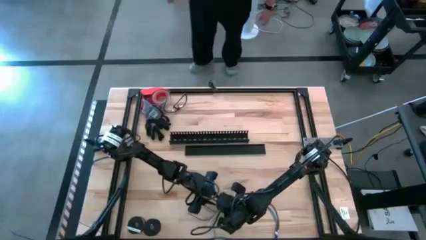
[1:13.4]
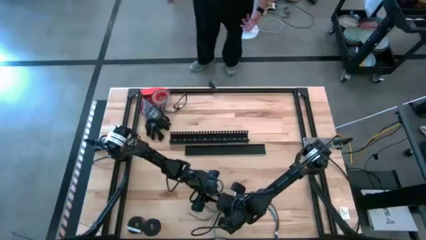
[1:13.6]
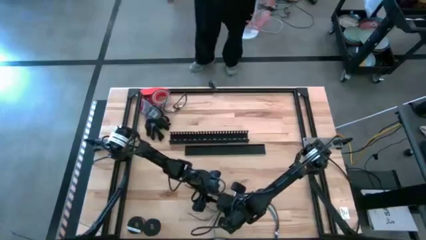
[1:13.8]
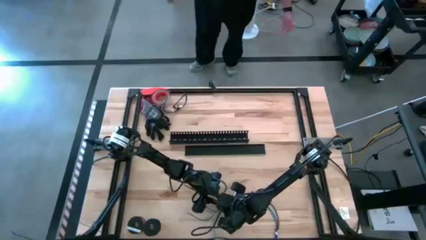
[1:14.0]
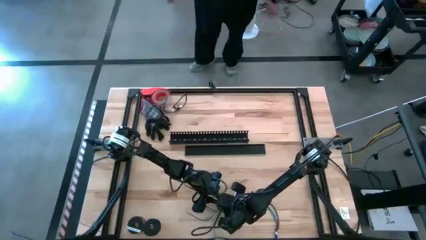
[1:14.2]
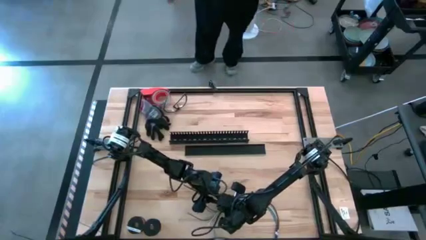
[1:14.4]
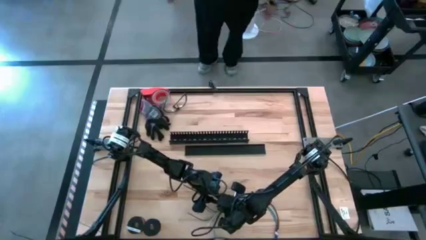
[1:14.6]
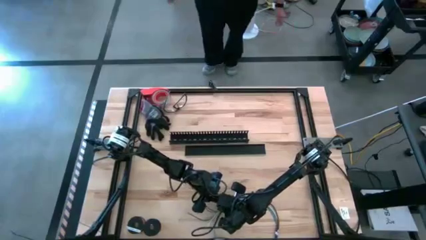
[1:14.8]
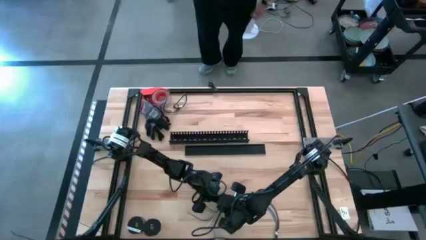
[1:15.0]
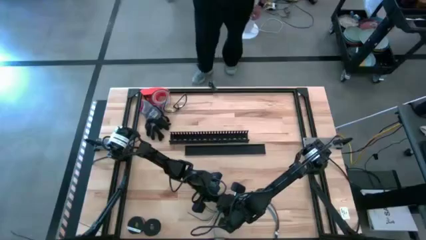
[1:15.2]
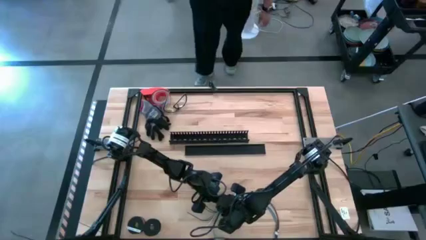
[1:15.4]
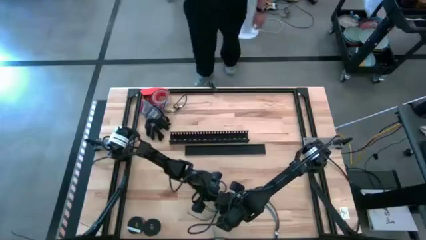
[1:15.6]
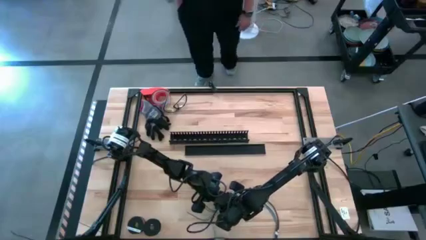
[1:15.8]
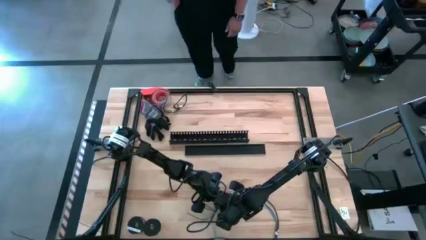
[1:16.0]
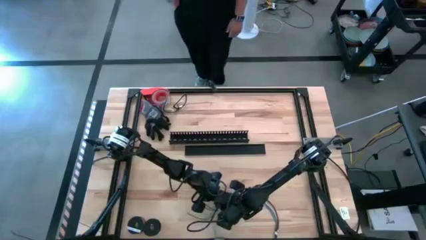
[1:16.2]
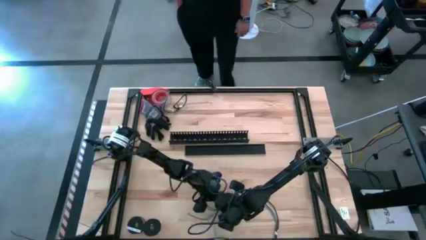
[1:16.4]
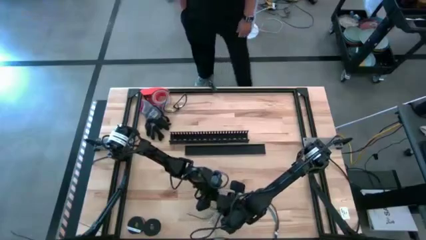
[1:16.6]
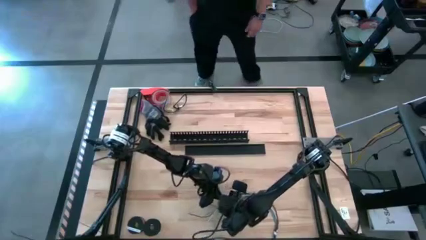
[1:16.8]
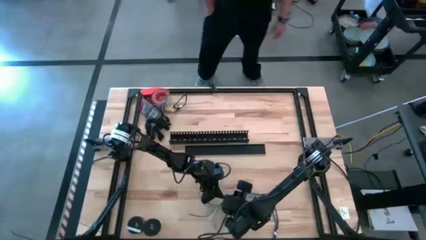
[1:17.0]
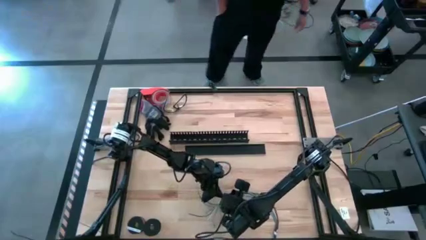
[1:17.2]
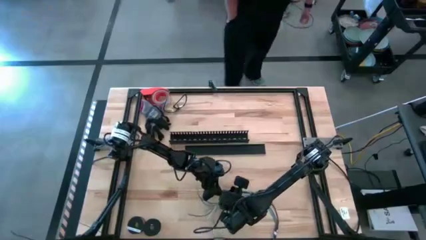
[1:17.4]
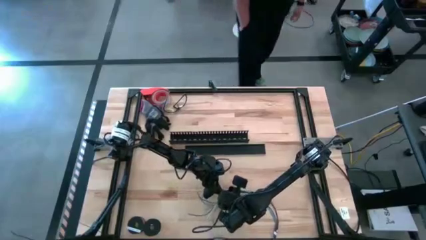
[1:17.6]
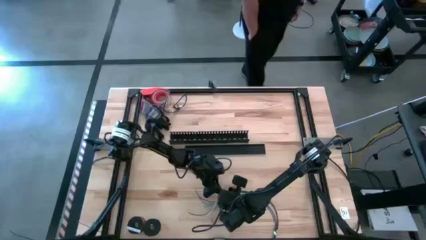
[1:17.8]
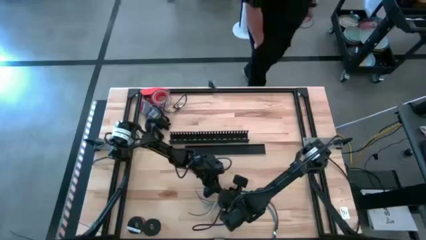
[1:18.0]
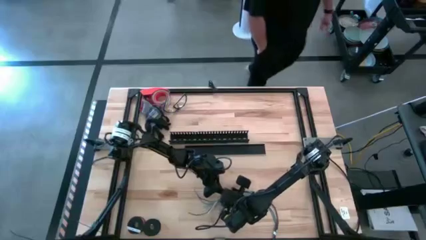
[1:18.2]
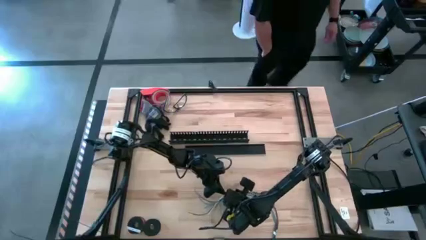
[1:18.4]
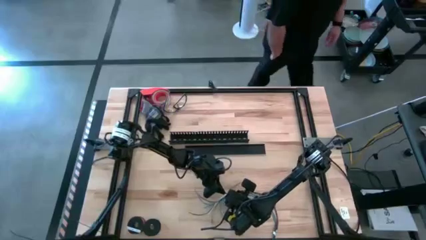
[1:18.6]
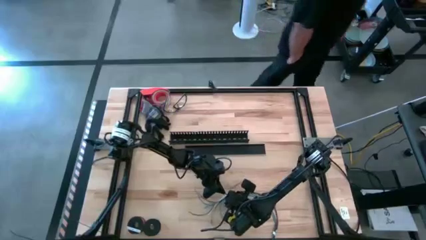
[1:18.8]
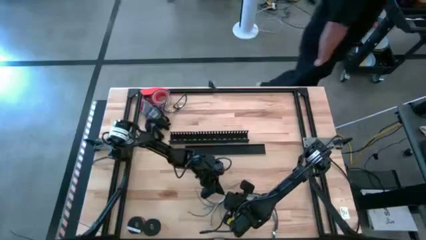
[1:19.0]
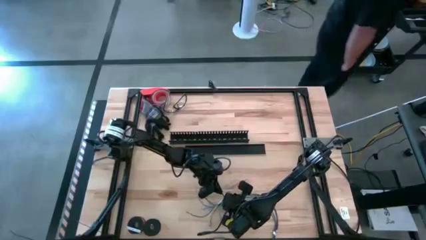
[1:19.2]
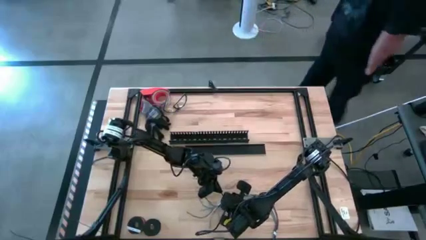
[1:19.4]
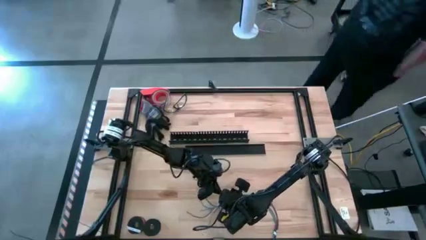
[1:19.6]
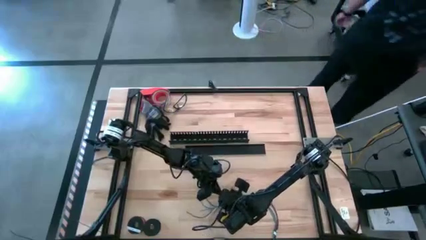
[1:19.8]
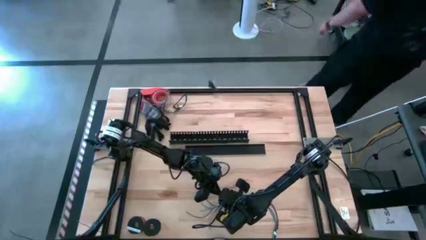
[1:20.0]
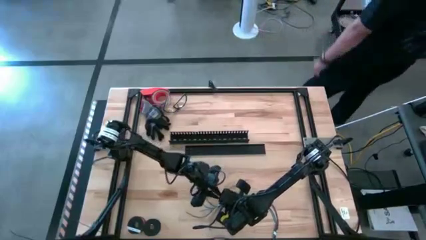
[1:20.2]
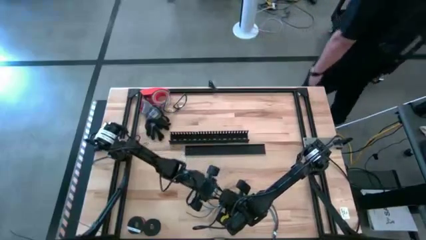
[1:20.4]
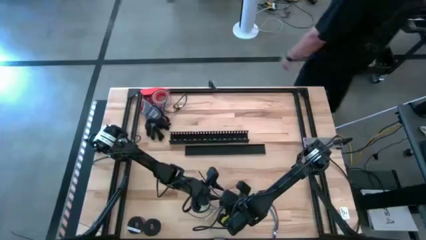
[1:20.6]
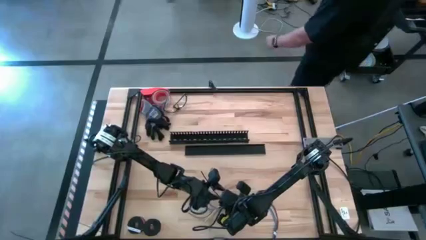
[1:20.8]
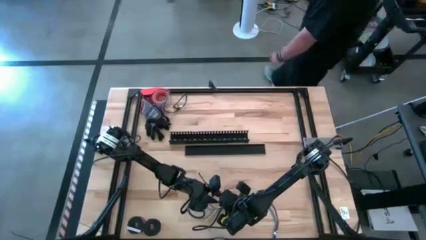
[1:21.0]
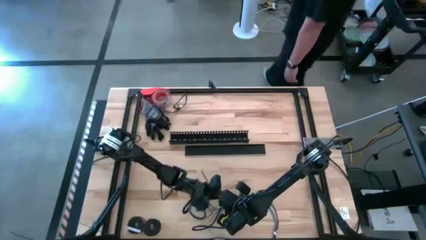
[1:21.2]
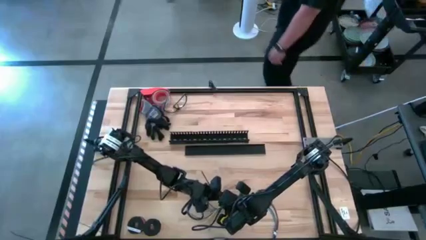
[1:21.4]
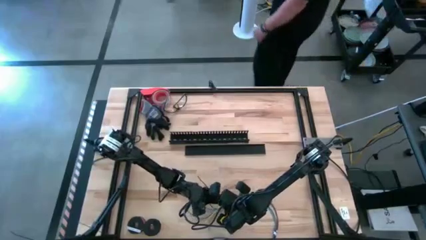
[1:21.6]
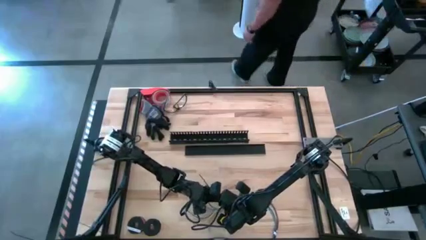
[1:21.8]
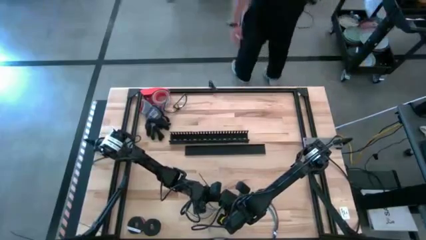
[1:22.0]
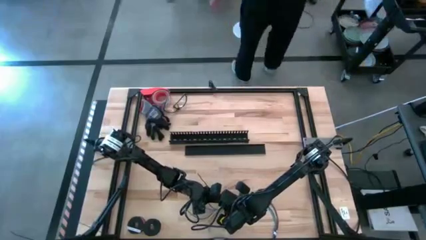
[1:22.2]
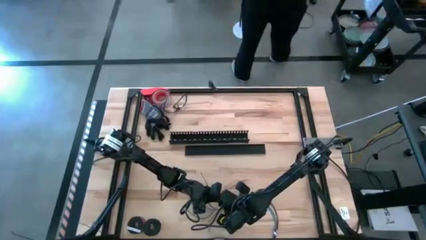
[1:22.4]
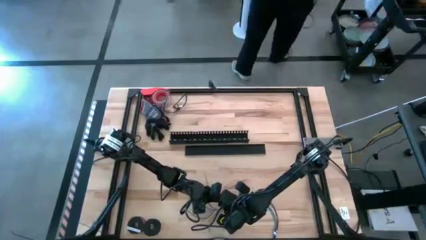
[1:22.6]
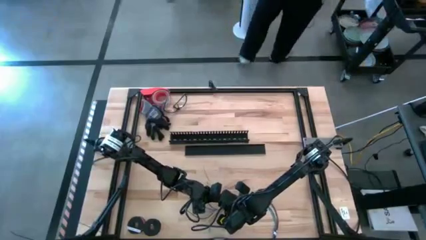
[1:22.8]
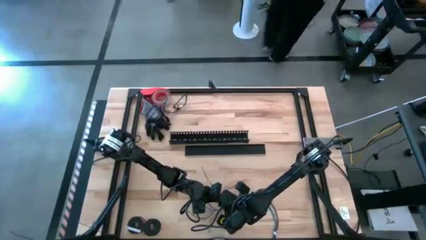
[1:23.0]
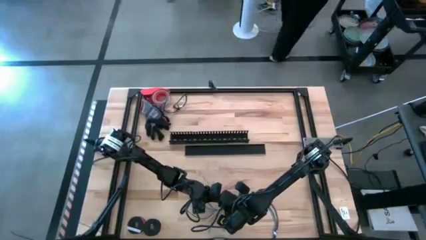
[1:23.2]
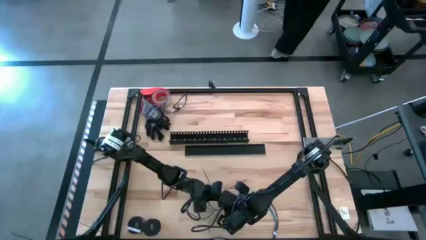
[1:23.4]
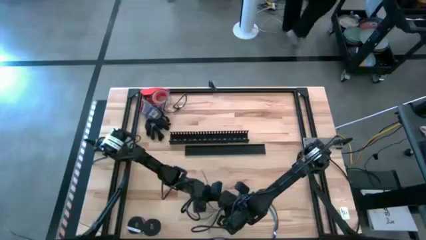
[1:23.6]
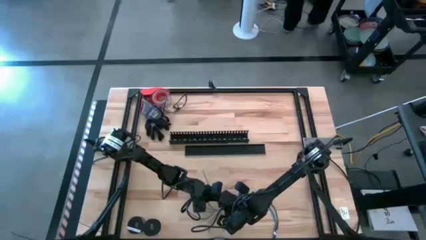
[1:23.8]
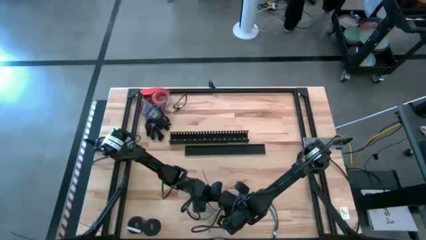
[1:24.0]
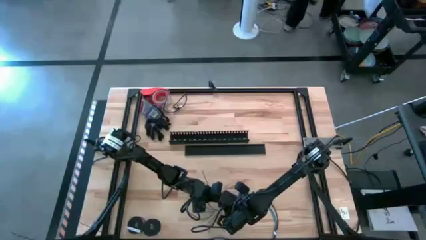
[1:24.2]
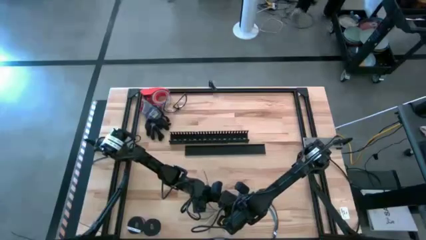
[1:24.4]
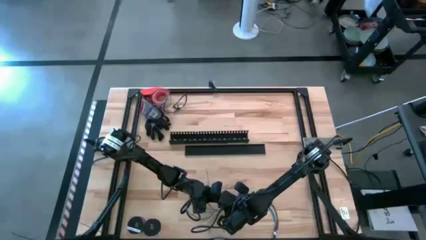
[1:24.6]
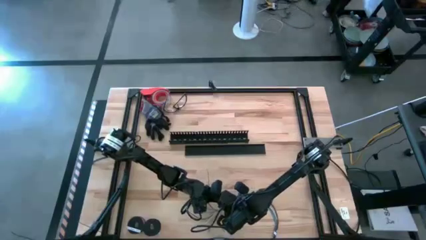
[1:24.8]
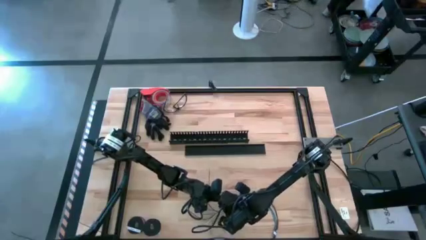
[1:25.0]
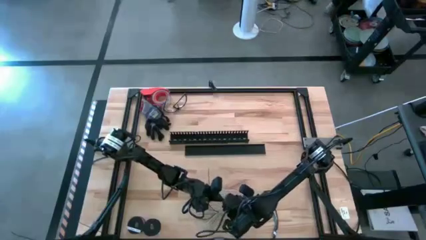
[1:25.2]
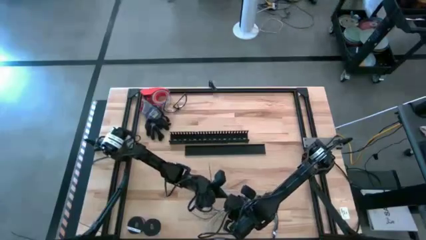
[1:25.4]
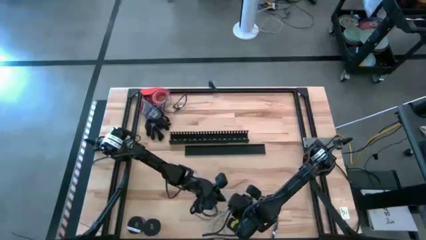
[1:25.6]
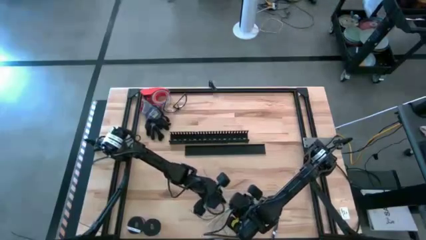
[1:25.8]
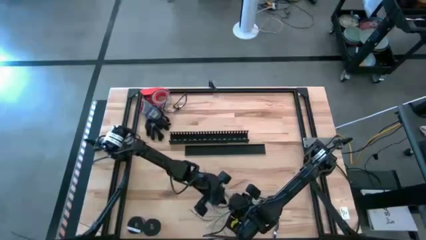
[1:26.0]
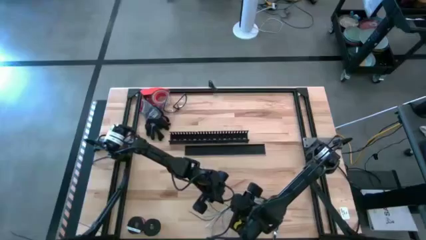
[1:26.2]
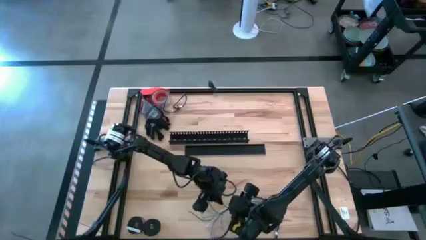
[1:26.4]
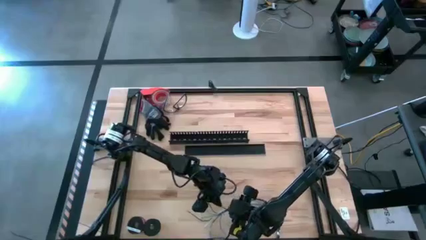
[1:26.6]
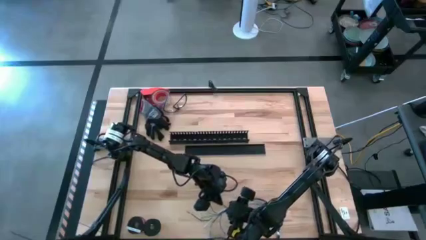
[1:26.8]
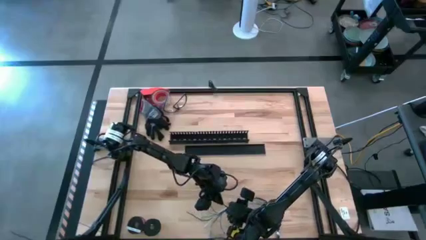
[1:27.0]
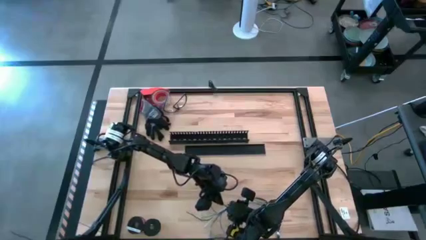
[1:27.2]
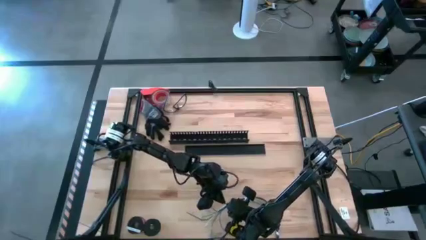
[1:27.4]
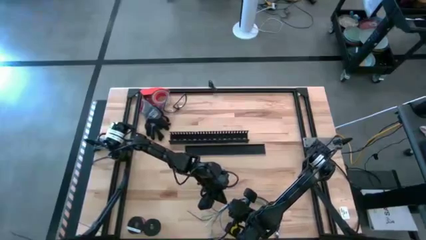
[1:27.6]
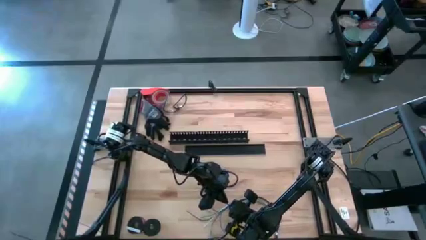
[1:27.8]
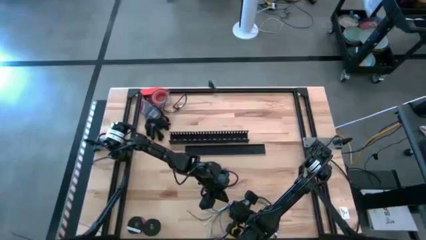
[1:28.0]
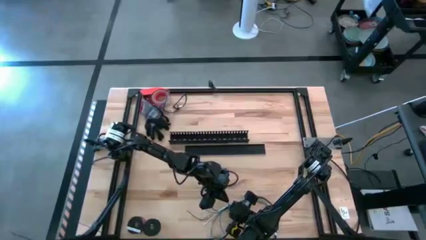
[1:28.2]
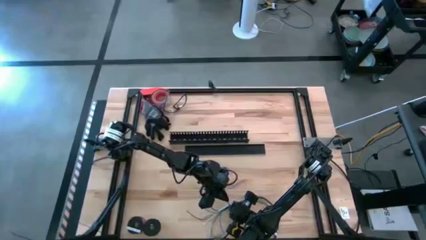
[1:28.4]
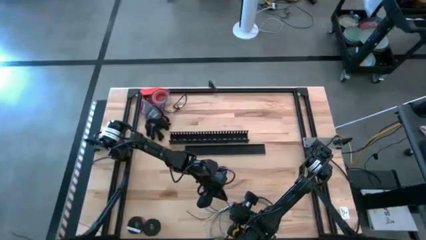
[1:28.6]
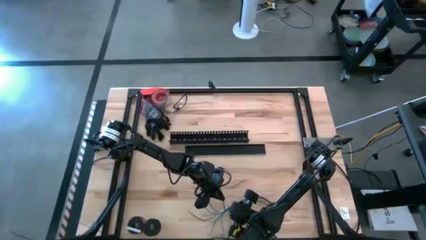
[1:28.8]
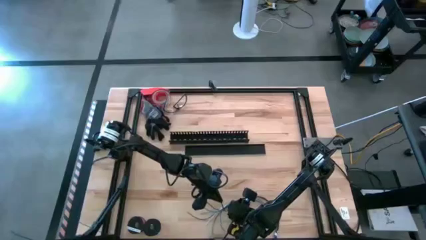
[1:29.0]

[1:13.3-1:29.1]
Task: Ziptie cables
Wrap the cable wires with the black zip tie

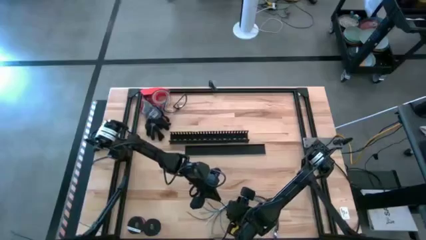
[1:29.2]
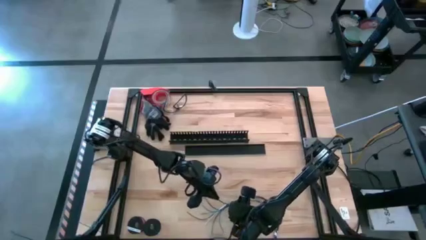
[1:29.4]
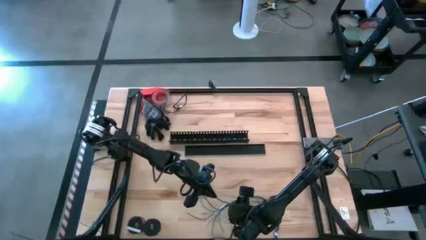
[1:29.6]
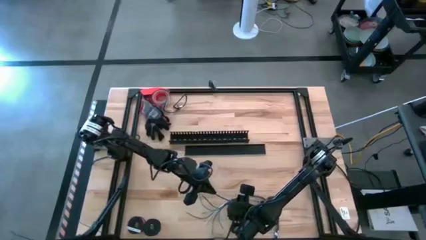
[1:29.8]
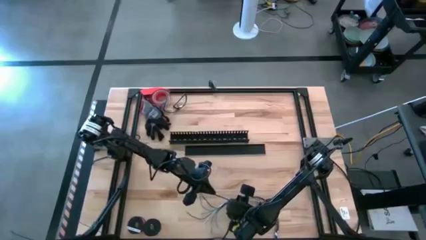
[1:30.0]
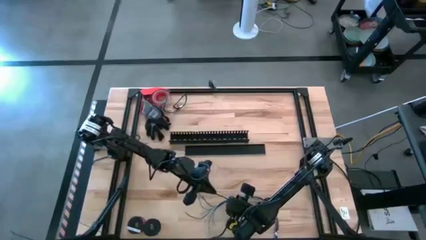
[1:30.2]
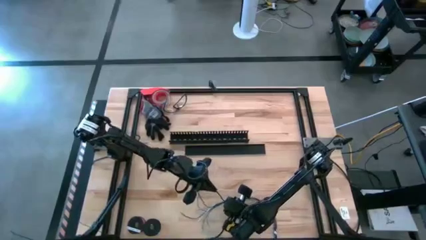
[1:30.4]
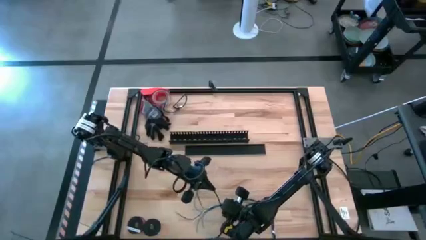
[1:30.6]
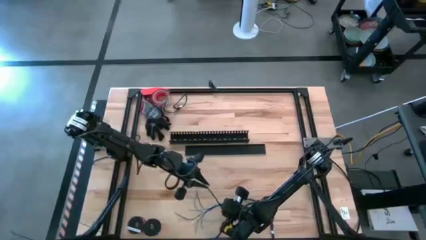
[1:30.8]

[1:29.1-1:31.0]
Wrap the cable wires with the black zip tie
